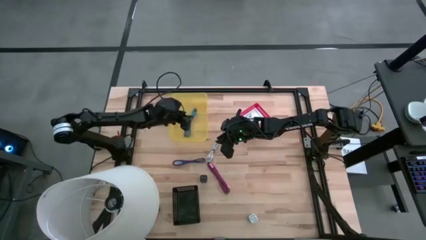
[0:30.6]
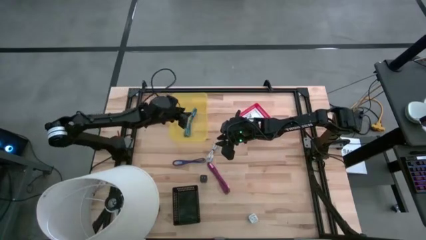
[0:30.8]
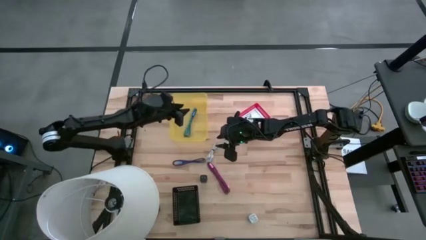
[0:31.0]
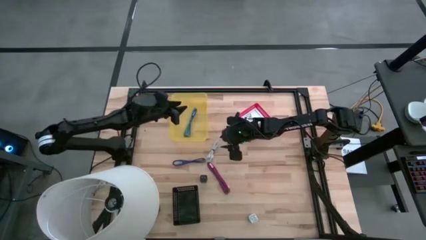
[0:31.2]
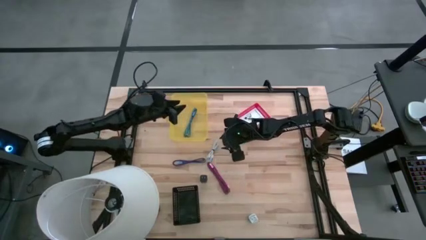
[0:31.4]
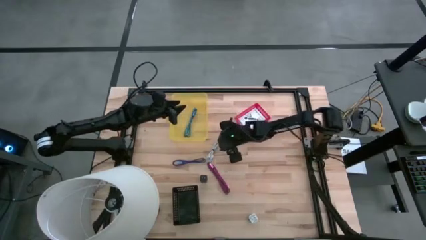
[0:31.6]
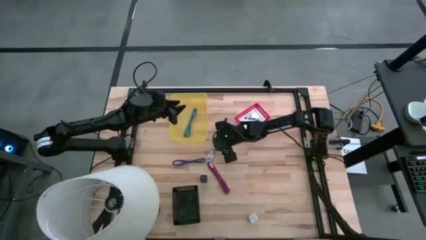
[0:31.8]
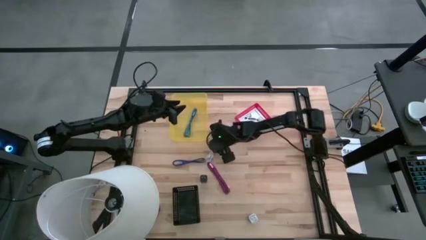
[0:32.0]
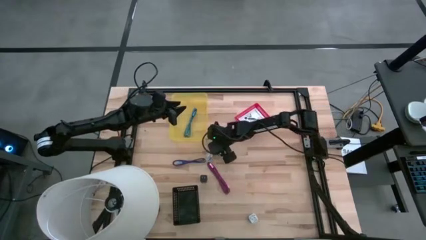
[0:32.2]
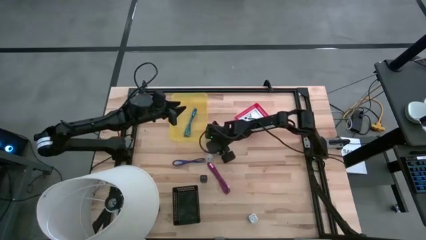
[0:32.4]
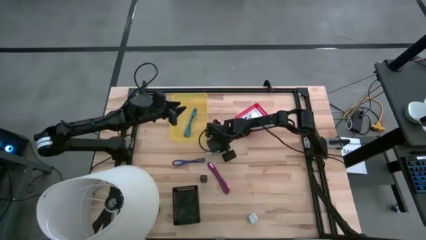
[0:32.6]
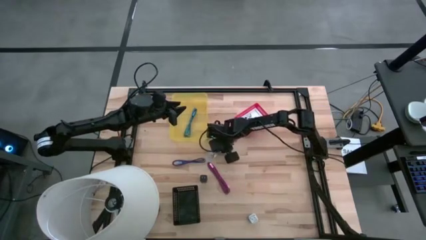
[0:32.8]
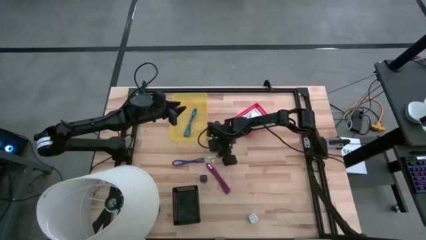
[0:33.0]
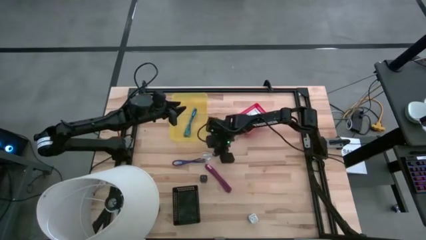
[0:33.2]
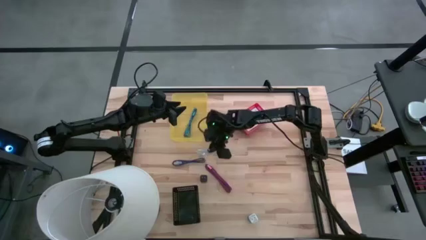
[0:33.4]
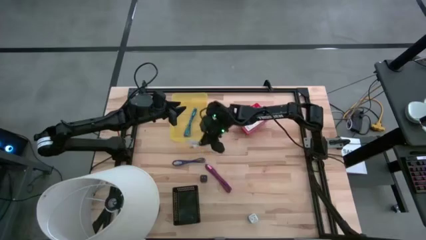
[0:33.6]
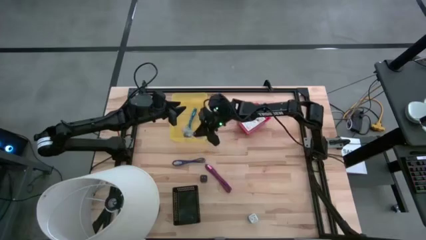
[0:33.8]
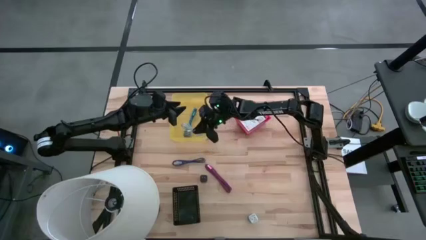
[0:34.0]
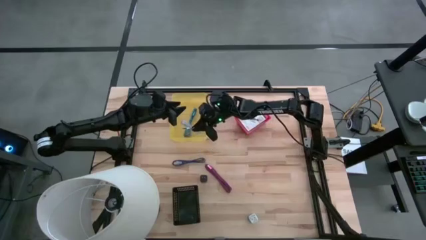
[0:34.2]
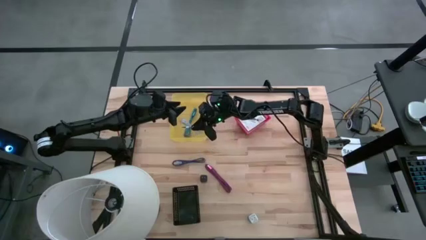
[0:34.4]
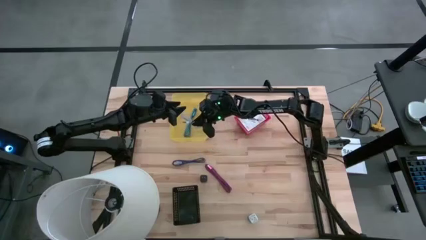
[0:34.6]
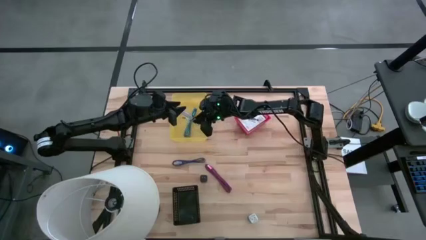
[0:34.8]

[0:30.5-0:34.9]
Task: Pick and place items into bin
Put the white charger cable into the yellow bin

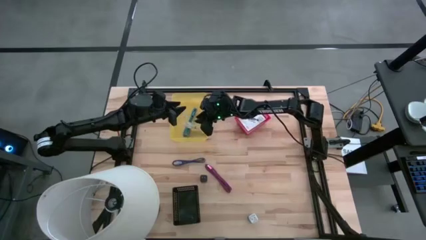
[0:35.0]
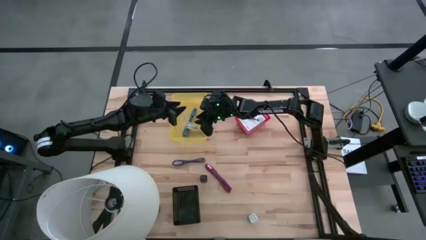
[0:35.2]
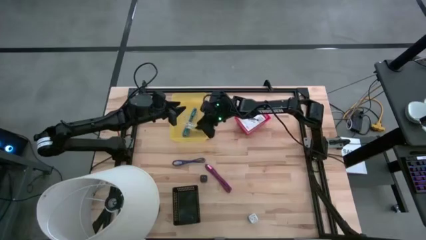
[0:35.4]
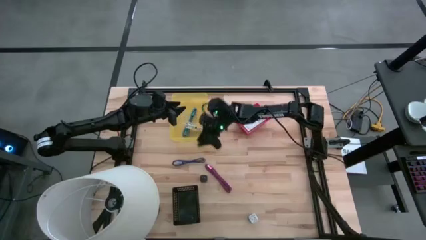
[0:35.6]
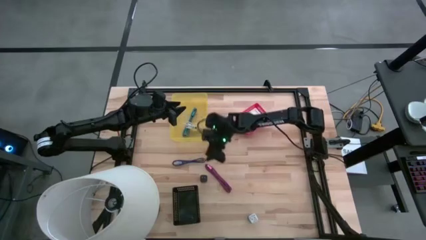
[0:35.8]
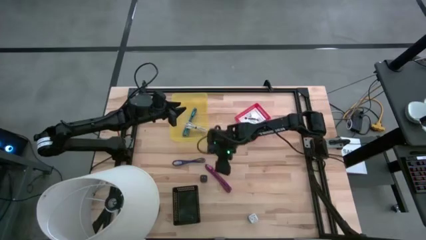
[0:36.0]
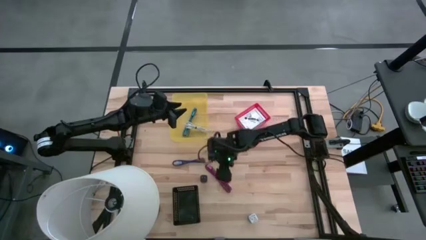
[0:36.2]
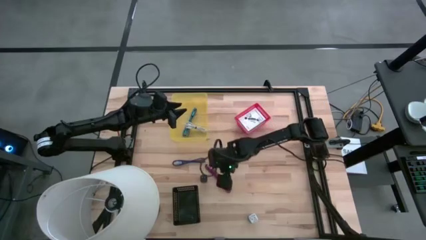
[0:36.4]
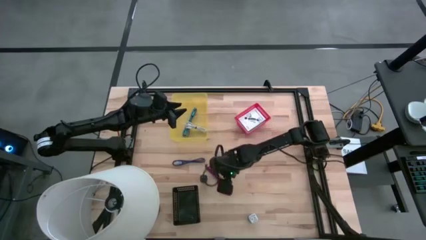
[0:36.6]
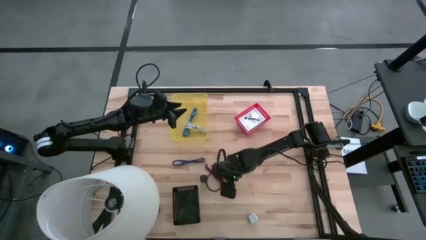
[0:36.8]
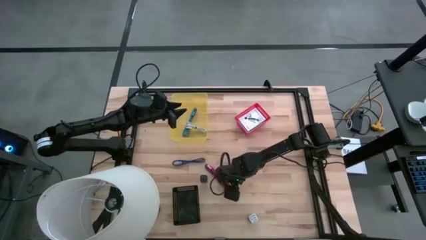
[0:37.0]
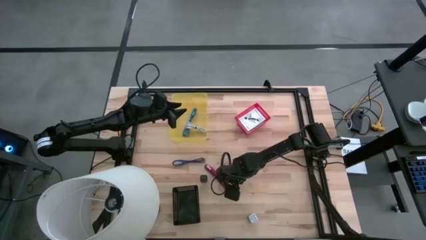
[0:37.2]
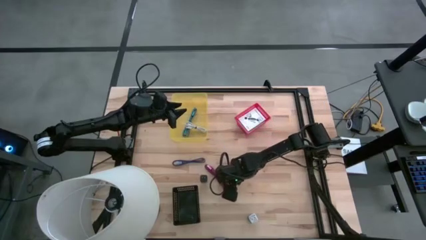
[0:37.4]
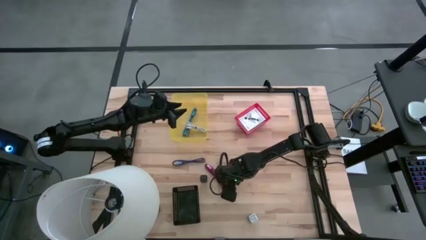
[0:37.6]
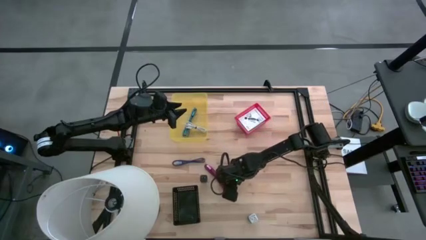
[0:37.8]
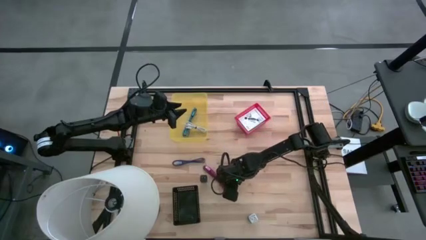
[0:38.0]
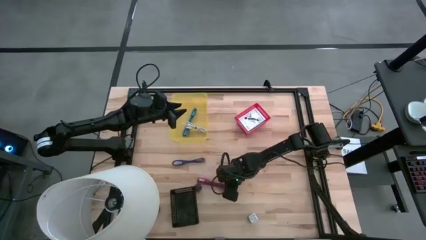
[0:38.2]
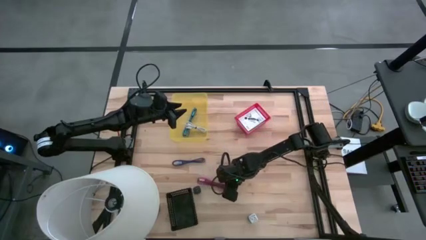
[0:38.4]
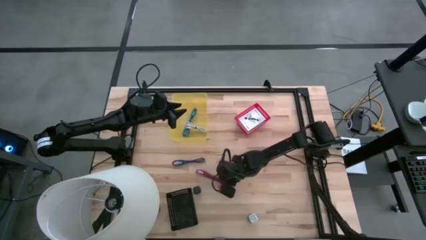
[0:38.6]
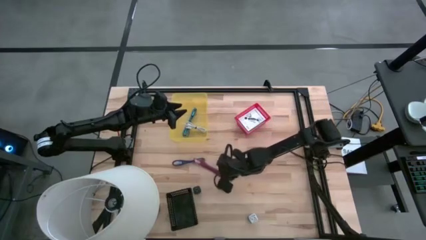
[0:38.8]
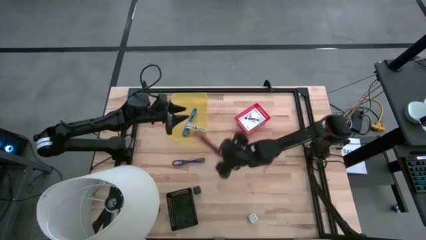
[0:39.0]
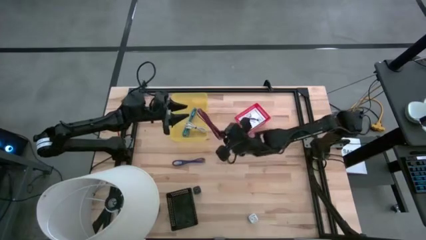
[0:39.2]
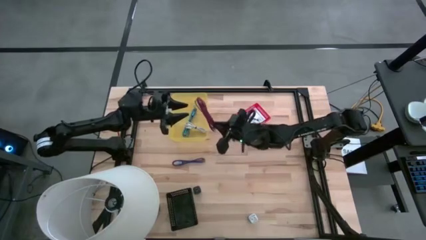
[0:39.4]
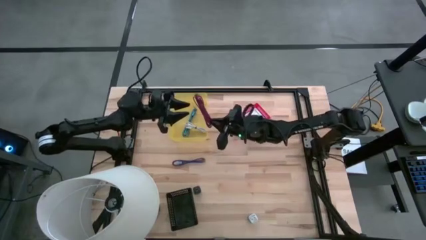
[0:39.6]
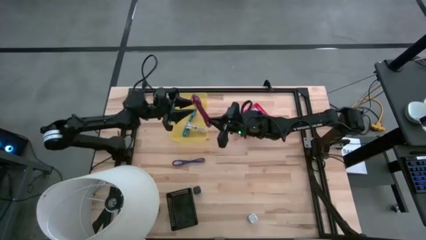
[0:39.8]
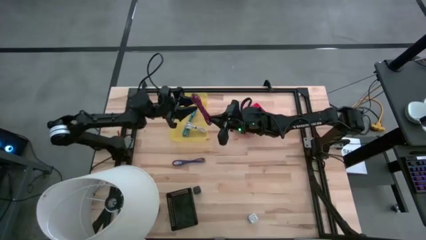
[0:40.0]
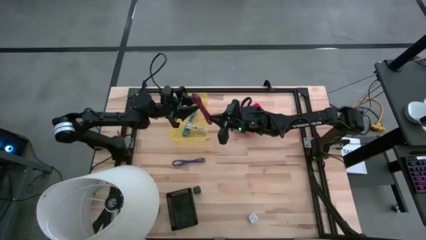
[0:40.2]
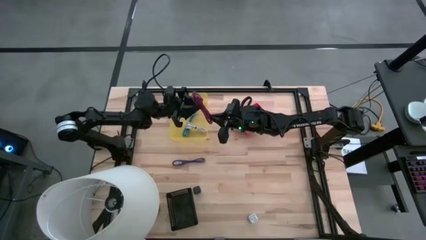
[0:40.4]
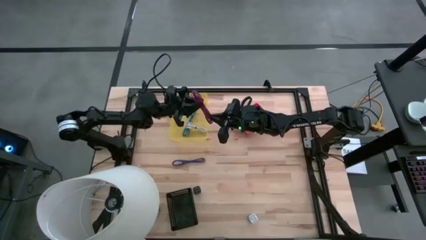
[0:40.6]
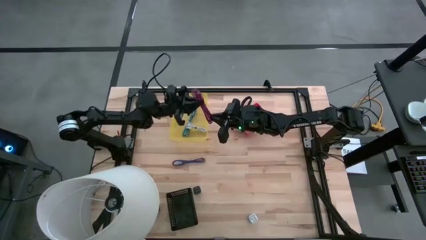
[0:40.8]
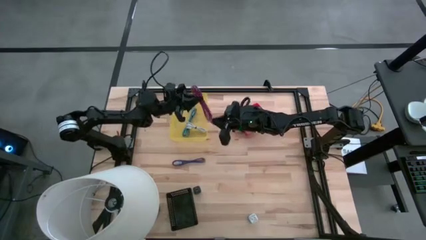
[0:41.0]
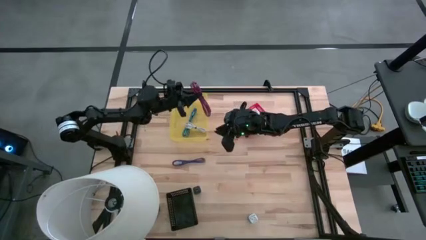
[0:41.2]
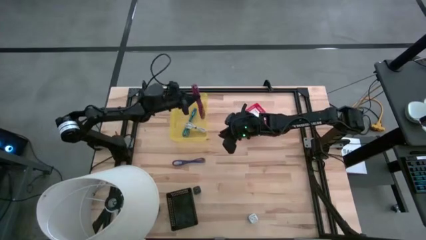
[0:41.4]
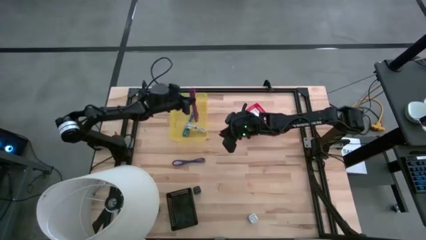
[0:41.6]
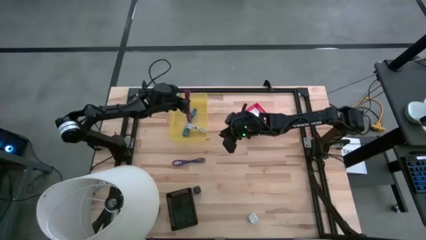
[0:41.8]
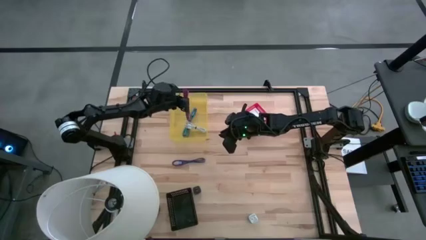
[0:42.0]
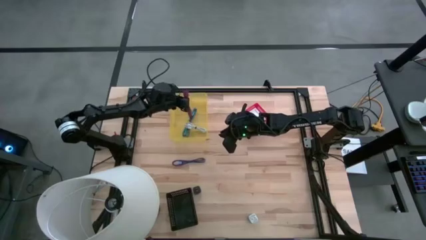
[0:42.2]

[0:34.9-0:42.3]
Put the pink charger cable into the yellow bin

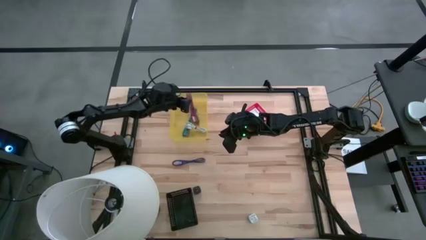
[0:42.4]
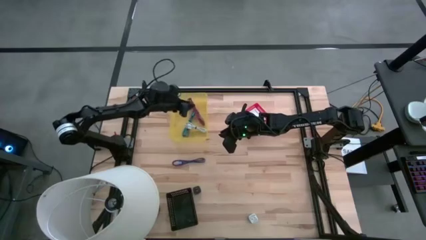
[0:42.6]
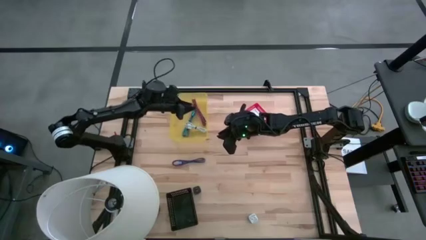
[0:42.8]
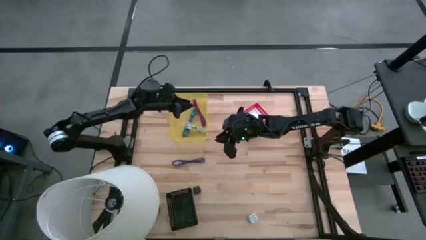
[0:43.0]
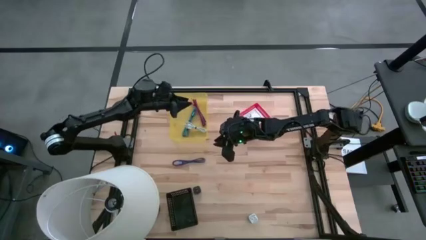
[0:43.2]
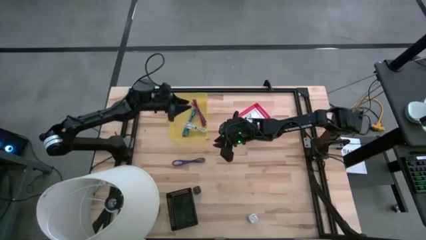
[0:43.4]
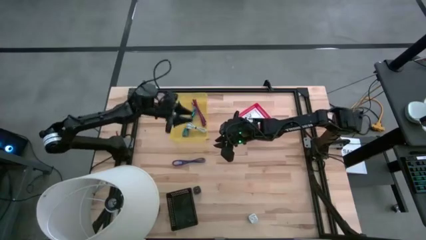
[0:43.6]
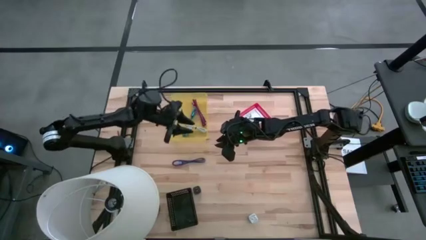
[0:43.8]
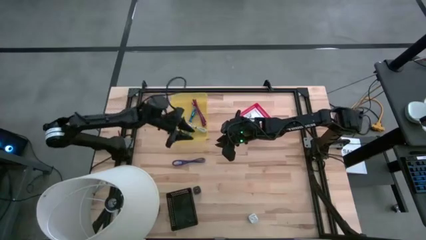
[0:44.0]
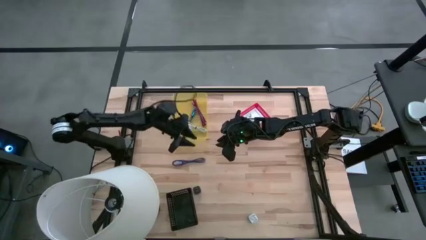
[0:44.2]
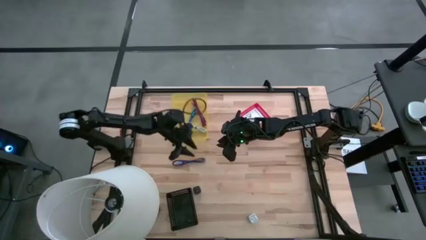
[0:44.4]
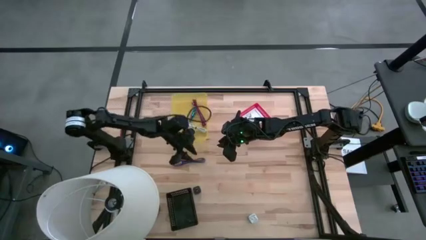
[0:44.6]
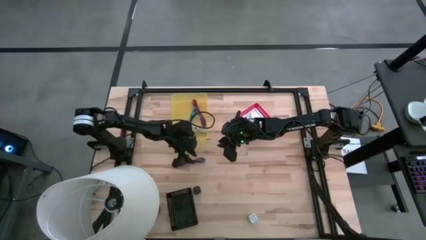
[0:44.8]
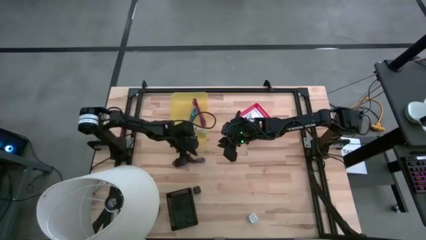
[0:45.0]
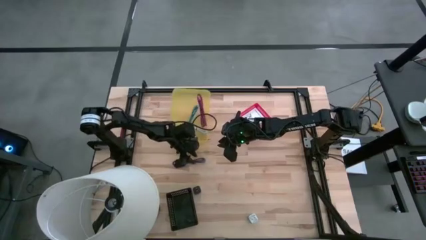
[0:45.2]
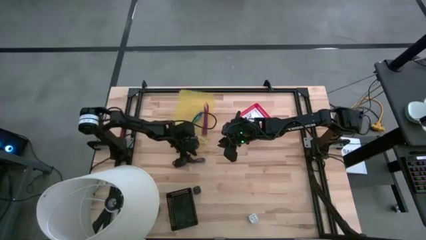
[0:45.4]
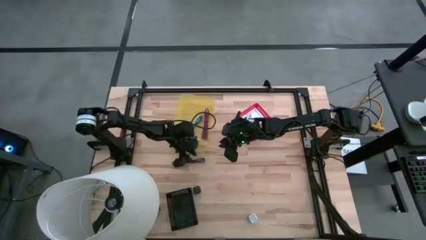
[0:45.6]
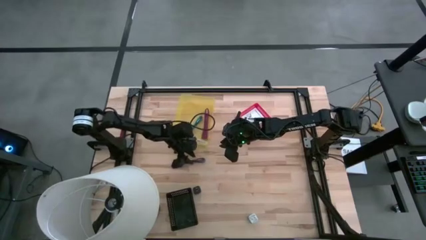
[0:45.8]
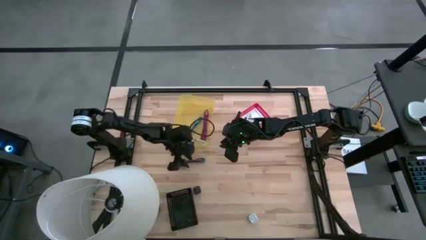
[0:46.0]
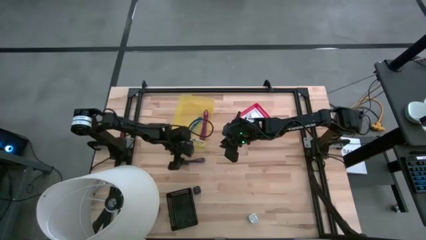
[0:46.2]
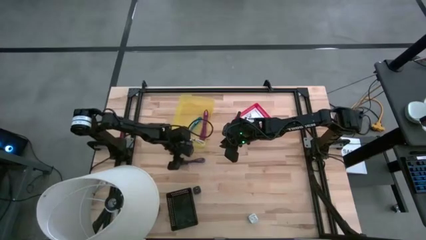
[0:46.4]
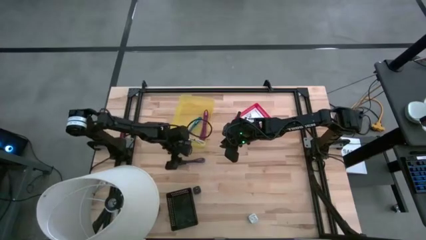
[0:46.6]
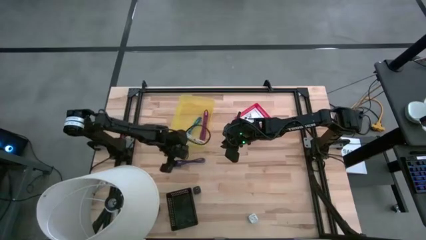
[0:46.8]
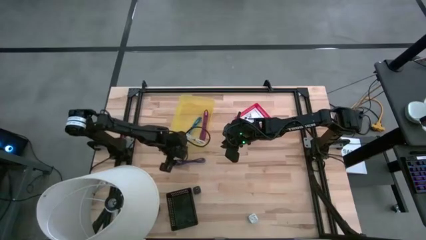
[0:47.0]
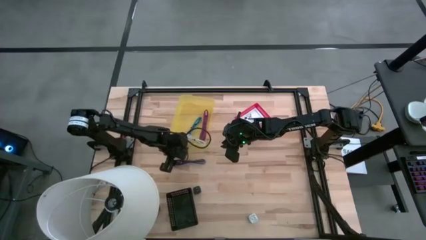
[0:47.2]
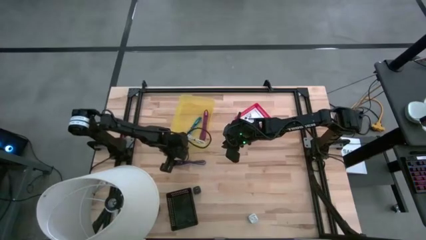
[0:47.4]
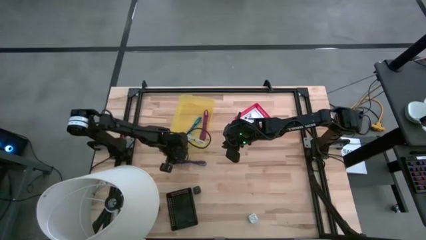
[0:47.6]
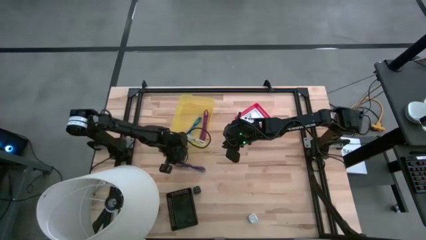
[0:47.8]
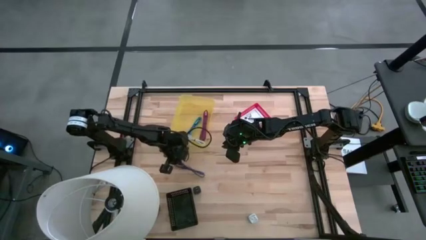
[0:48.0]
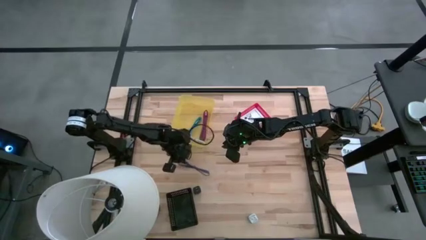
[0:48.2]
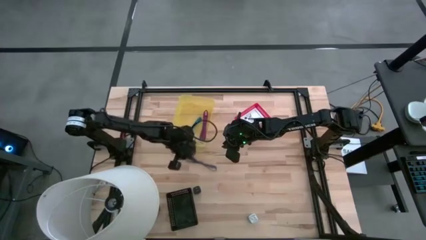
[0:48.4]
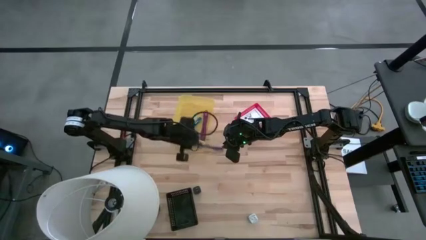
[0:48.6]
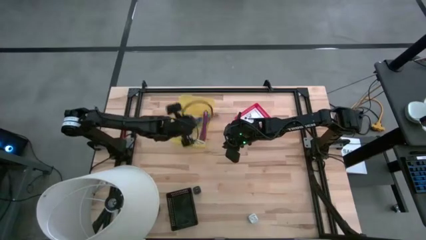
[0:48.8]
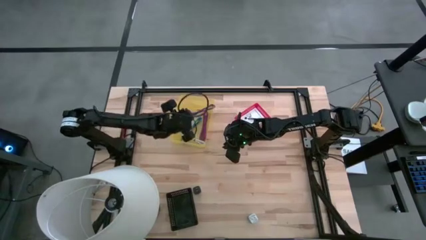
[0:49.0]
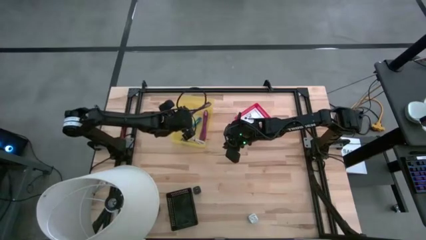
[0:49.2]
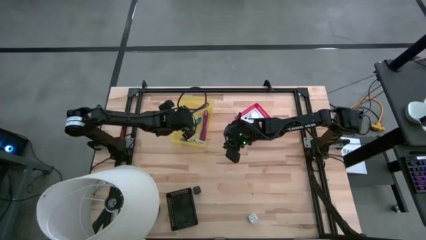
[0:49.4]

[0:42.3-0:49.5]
Put the dark blue charger cable into the yellow bin
